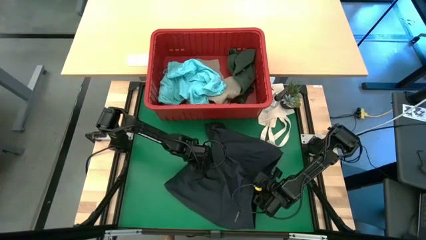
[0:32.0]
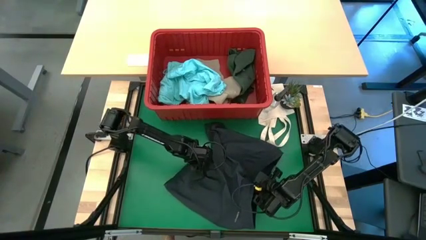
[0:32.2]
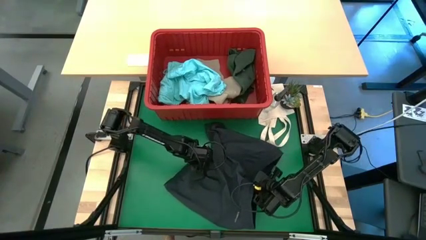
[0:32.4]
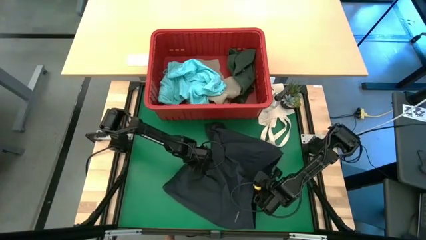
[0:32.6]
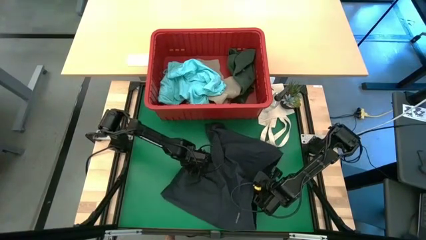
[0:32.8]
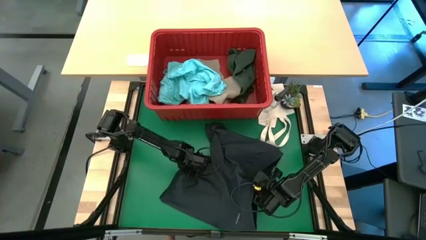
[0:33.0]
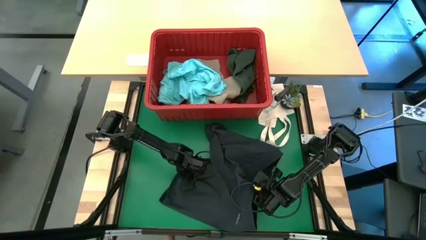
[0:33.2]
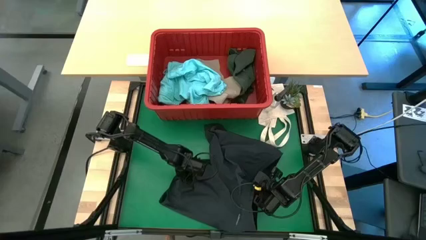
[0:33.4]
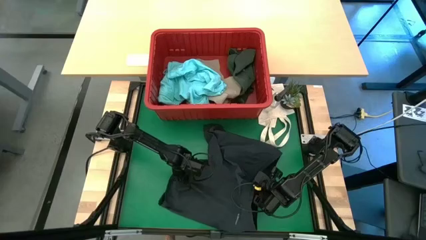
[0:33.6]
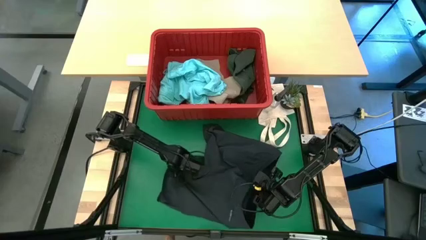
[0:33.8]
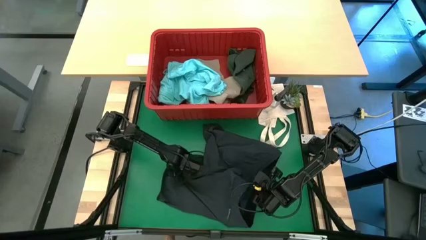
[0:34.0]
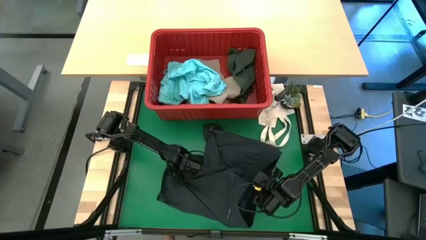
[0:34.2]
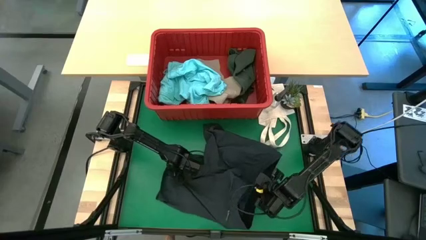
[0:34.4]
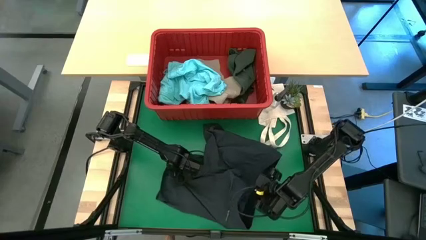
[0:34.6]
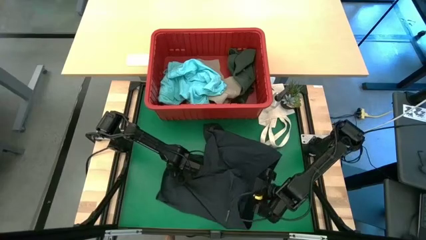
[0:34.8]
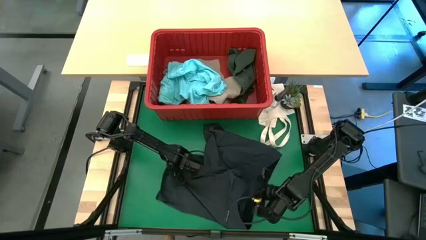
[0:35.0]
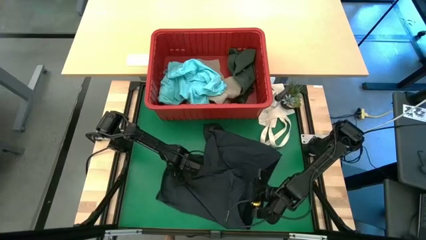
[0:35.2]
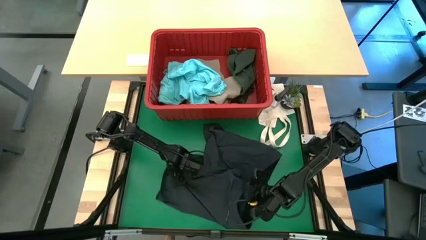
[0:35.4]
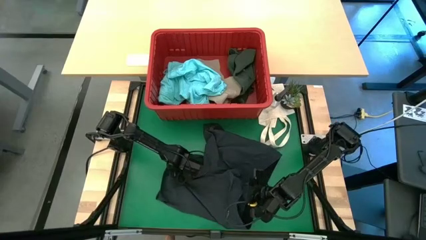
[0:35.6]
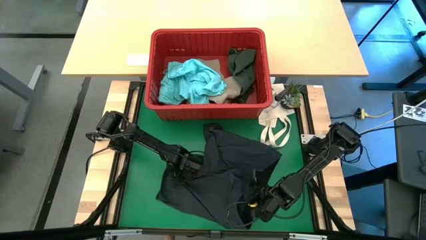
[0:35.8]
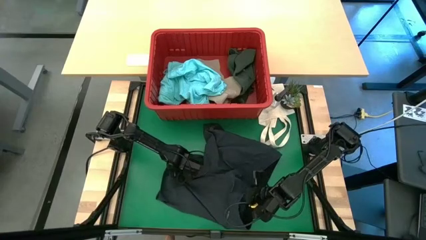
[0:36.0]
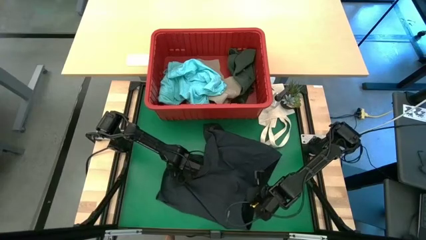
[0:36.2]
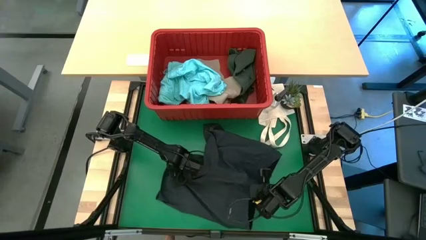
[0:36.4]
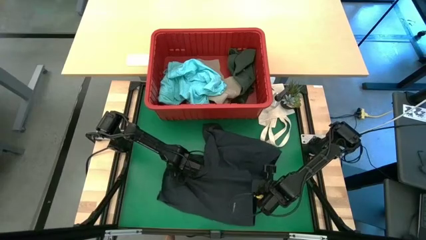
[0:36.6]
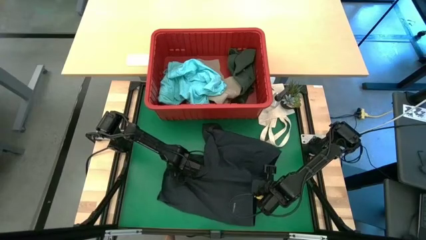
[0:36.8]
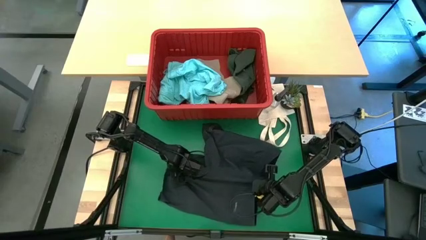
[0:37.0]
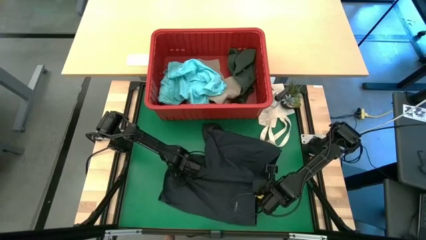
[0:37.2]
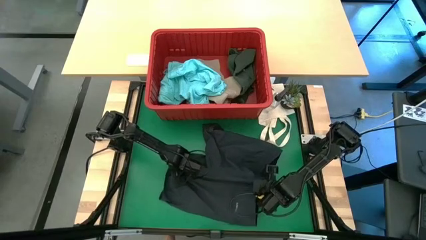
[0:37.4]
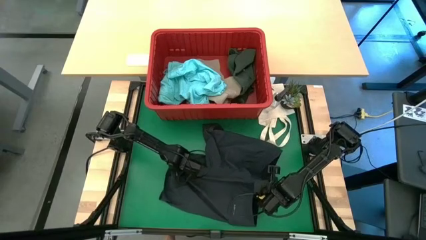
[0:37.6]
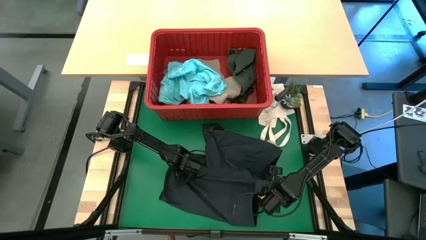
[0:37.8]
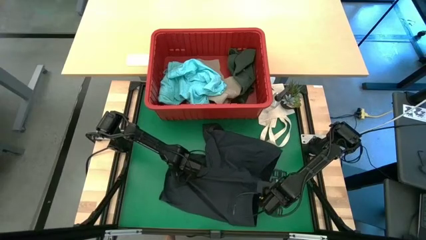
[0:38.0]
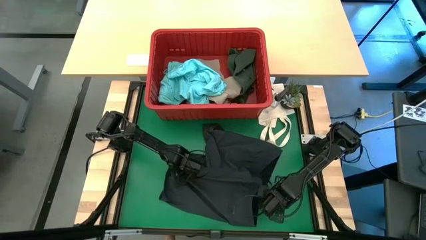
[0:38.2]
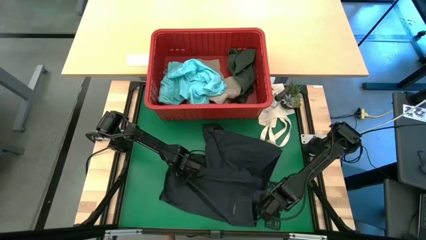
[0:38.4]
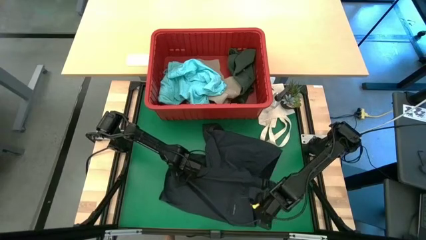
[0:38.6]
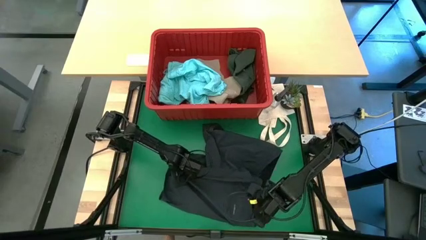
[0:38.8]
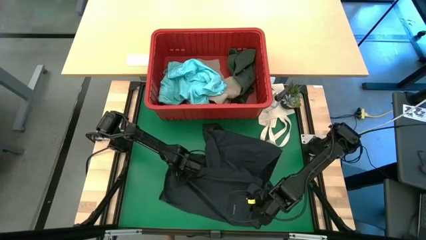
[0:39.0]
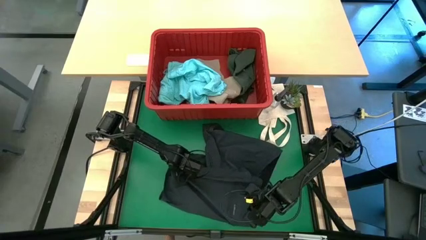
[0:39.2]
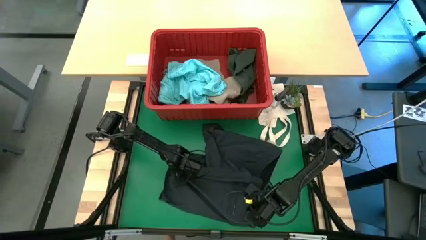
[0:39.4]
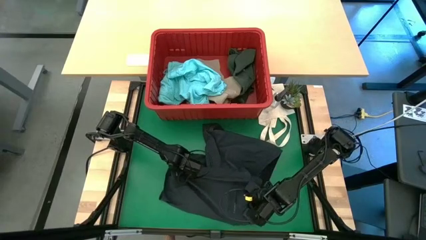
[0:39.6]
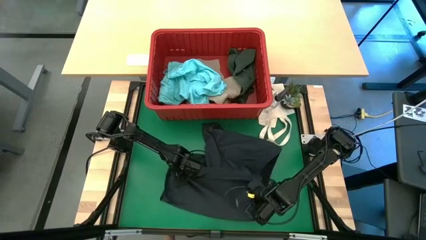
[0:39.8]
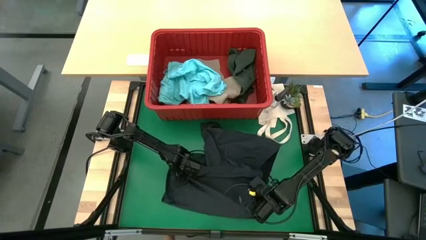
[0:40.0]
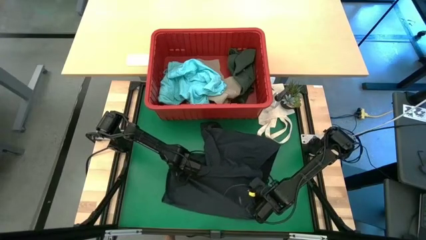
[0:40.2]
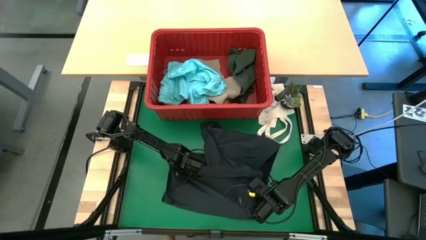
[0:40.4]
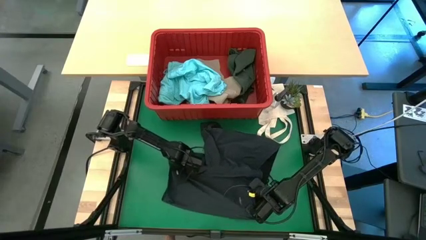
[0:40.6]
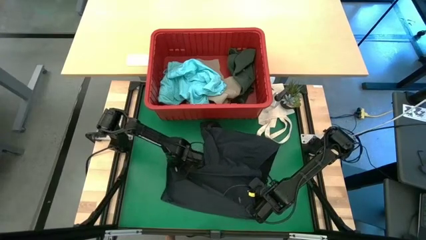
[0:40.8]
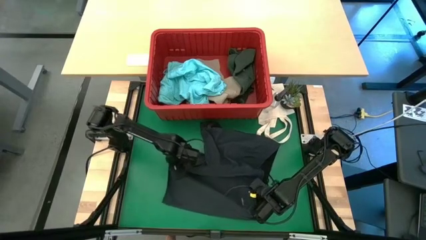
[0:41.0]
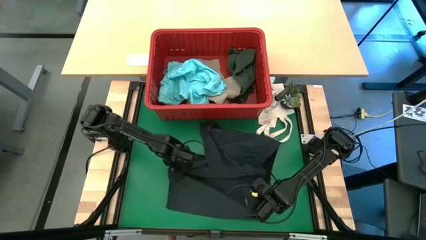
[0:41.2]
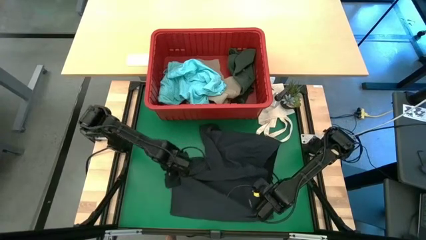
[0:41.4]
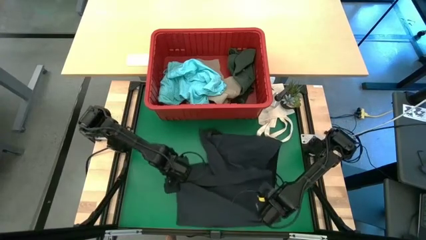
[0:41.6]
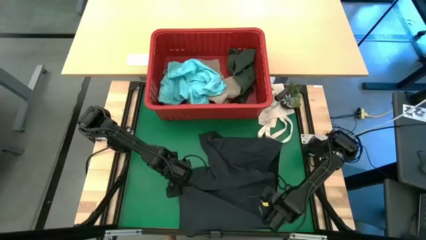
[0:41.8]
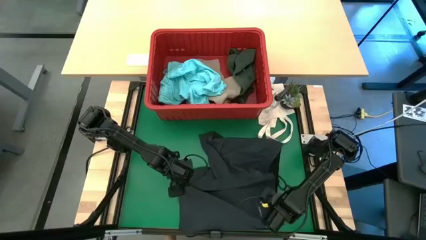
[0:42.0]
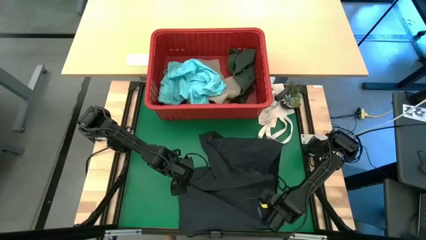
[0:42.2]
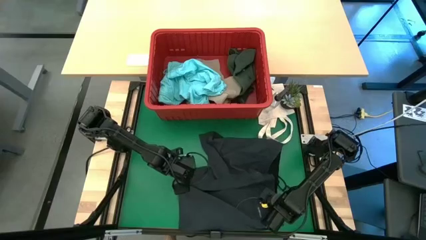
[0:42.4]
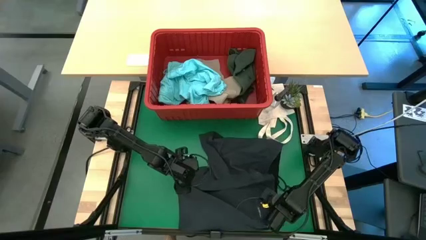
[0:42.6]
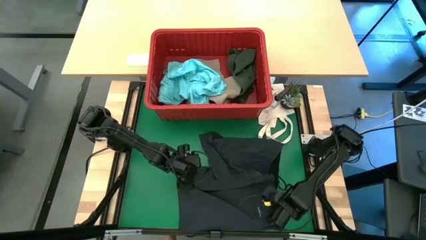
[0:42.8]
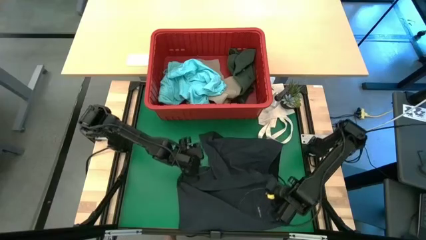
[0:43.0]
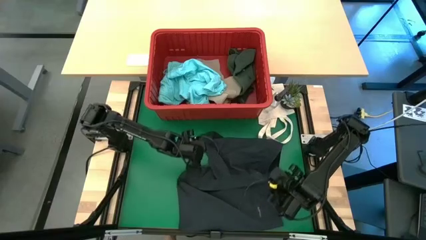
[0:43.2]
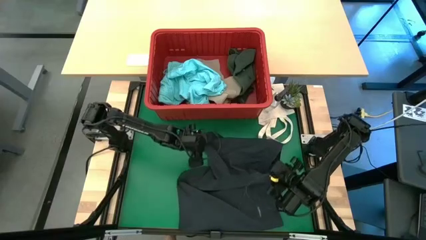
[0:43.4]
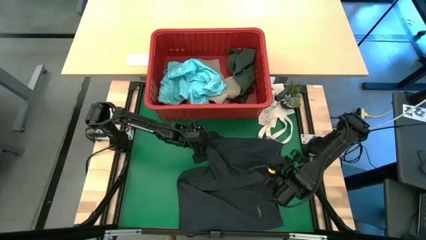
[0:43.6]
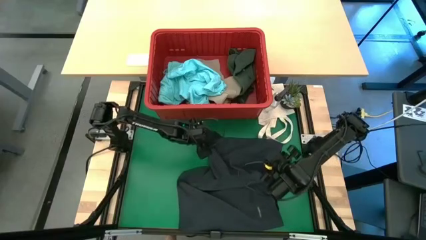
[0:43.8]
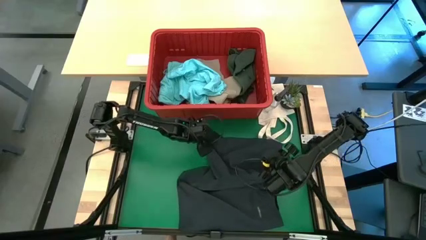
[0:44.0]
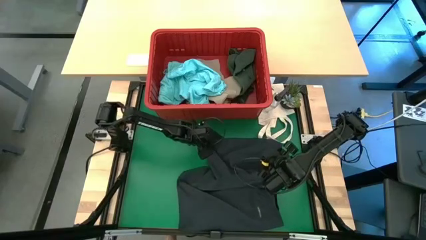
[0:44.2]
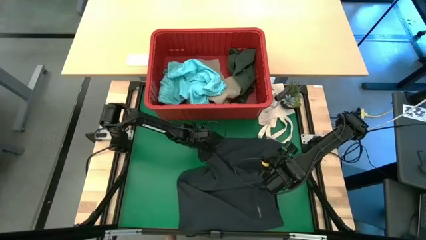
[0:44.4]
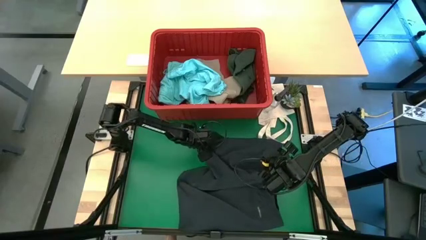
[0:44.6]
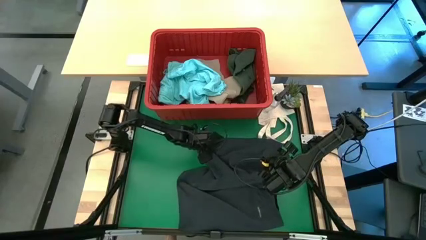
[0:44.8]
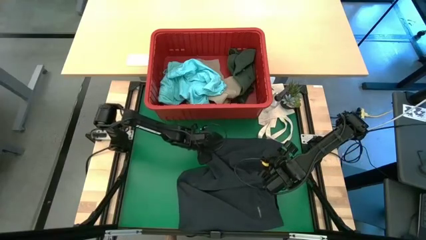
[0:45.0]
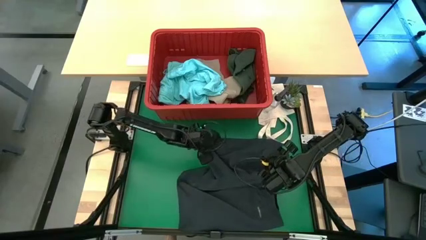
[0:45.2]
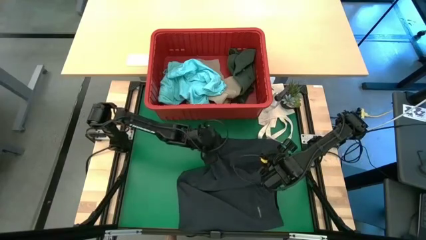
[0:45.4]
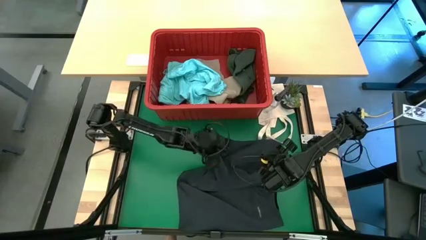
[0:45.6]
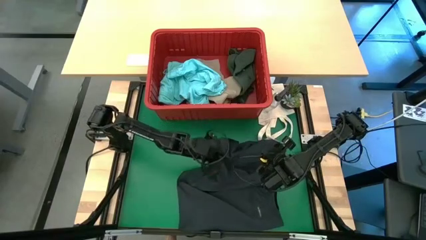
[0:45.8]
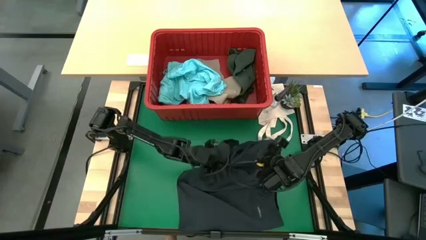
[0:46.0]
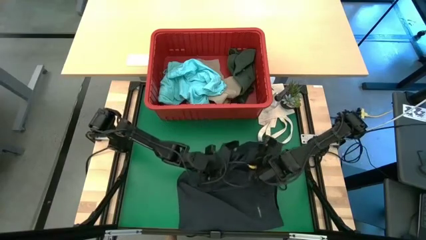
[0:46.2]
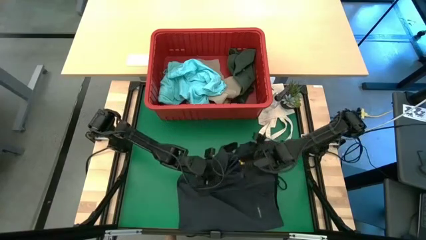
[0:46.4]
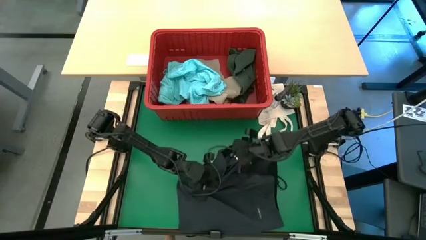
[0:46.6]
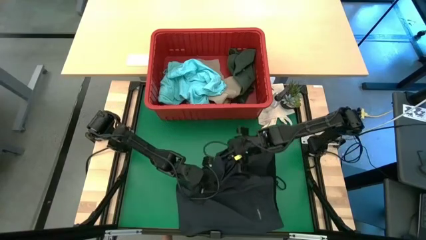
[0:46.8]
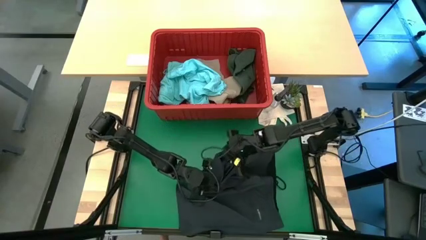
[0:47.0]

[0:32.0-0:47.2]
Task: Fold Laundry from Bin
Fold the black shorts from the red laundry bin

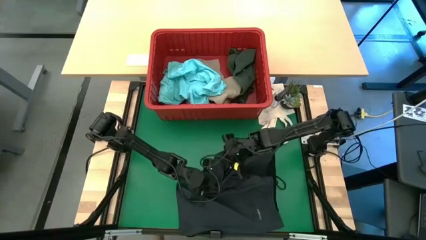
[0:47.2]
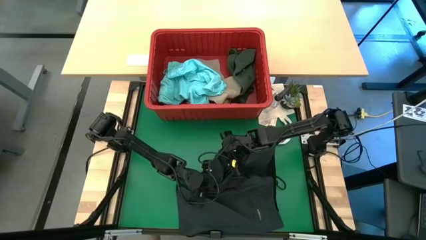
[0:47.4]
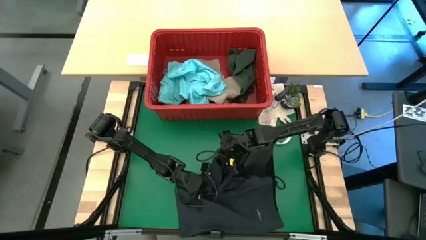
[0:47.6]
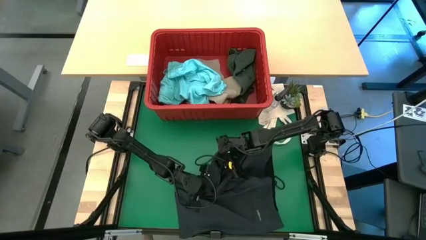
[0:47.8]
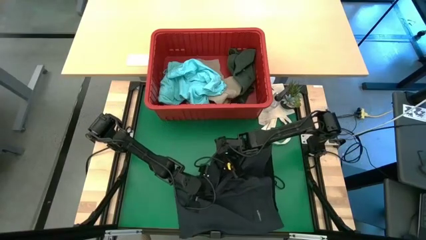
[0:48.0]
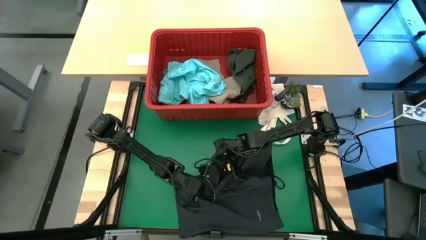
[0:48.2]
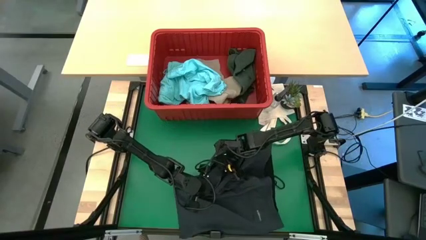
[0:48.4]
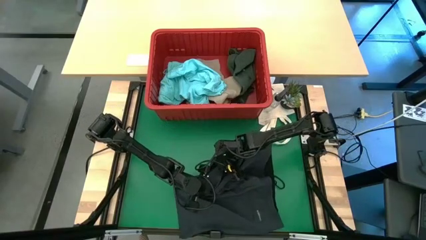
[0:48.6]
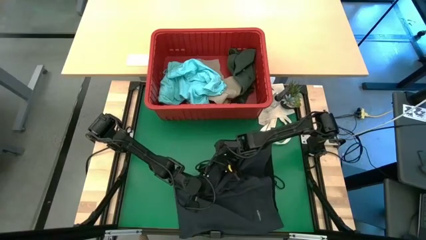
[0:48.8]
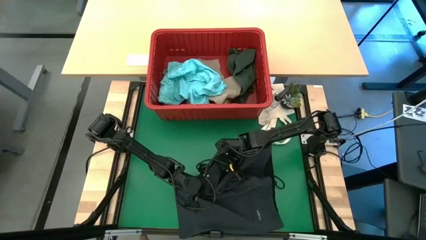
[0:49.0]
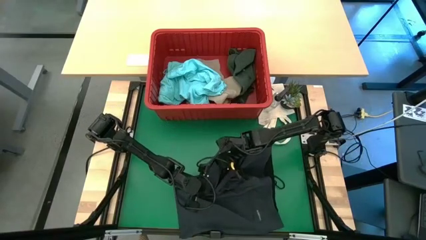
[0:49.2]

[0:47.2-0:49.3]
Fold the black shorts from the red laundry bin
